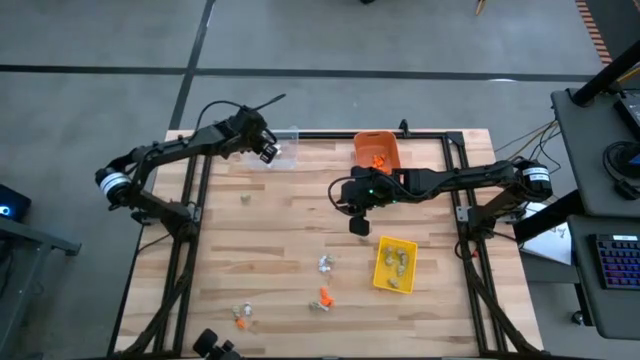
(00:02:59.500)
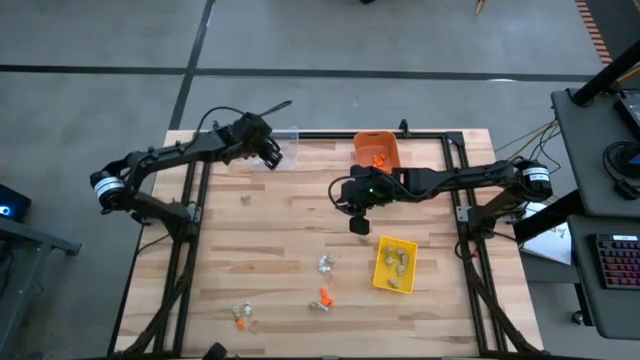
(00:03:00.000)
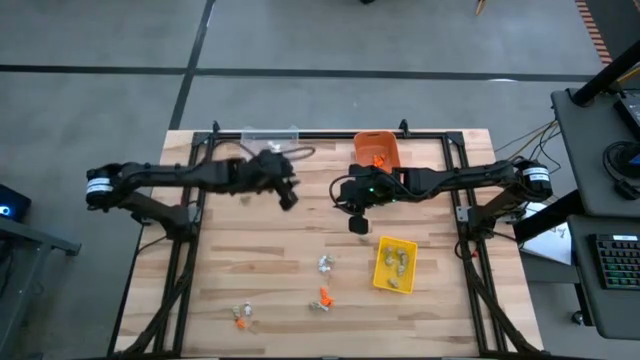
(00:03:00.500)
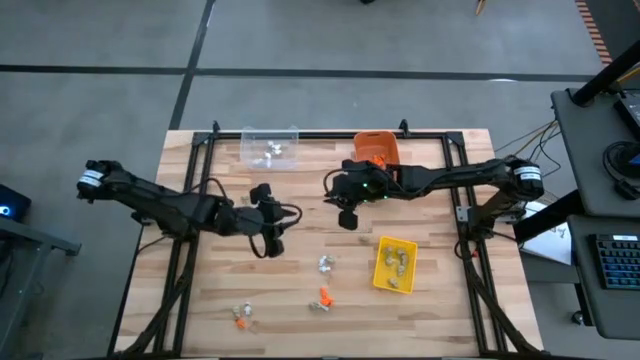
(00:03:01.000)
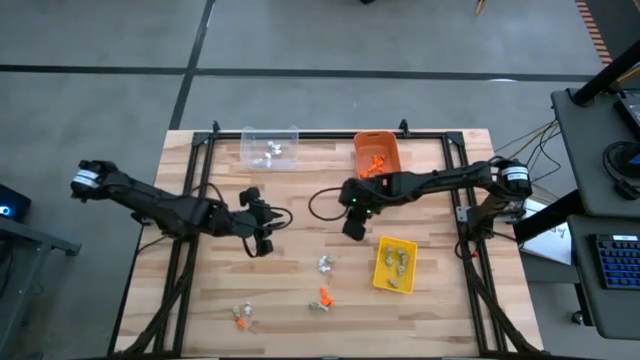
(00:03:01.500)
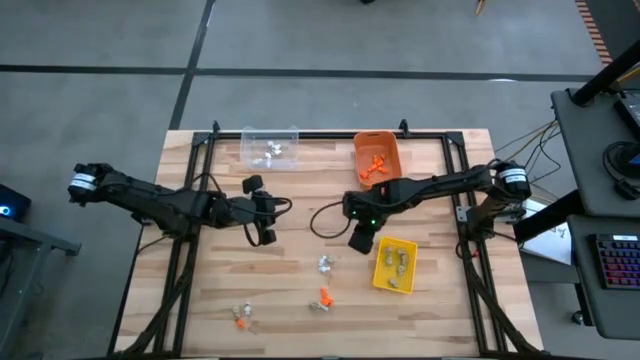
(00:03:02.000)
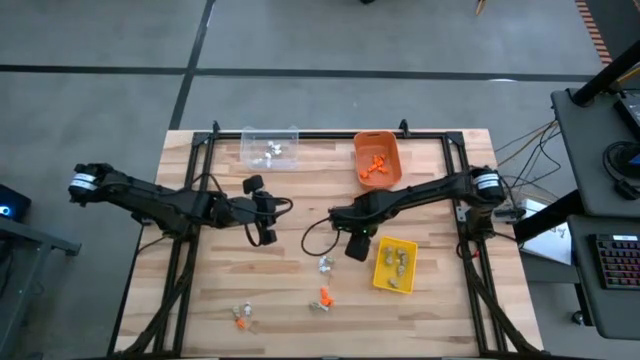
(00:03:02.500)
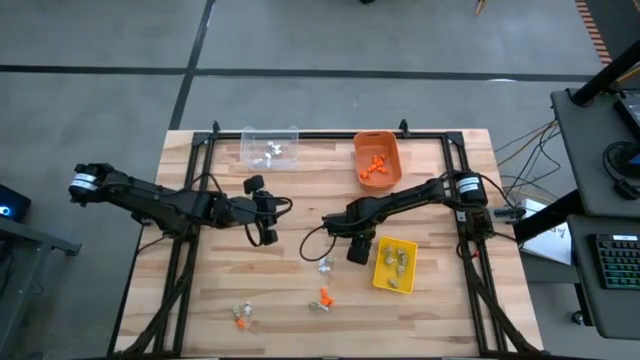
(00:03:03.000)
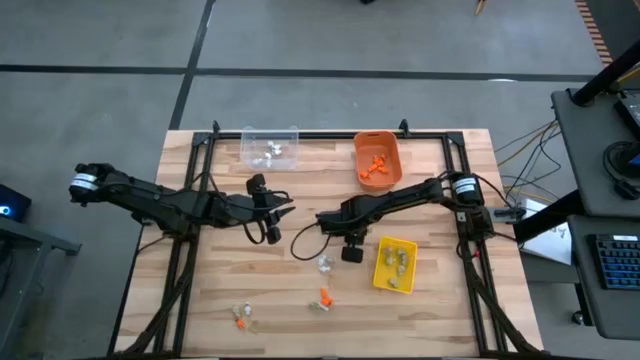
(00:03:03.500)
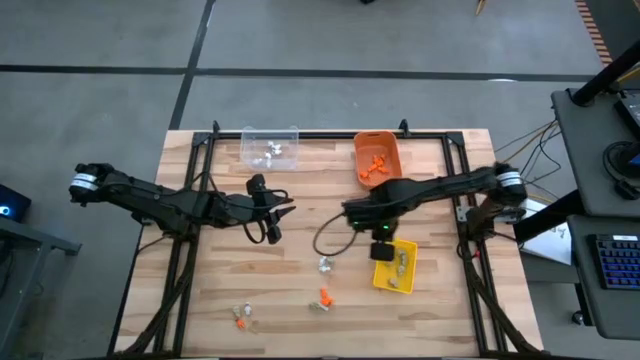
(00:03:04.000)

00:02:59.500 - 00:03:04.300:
Task: Sort Halloween decoration
Put the gray skull toy into the yellow bin

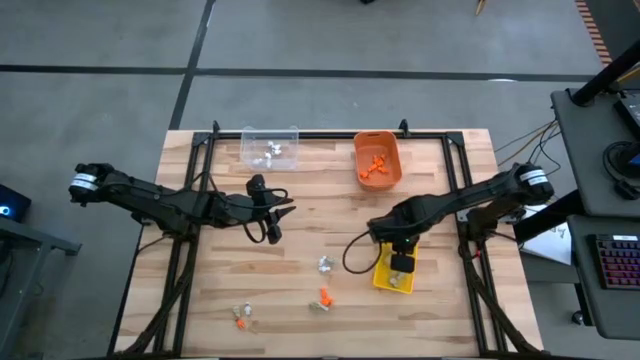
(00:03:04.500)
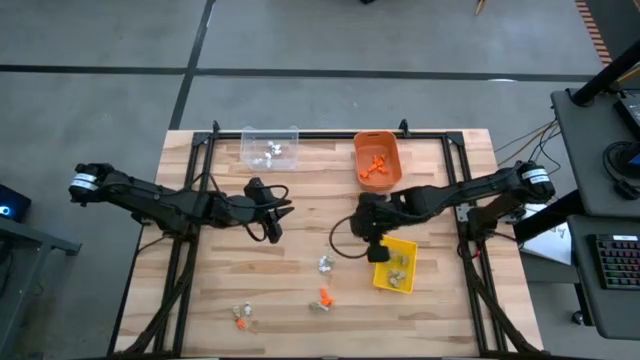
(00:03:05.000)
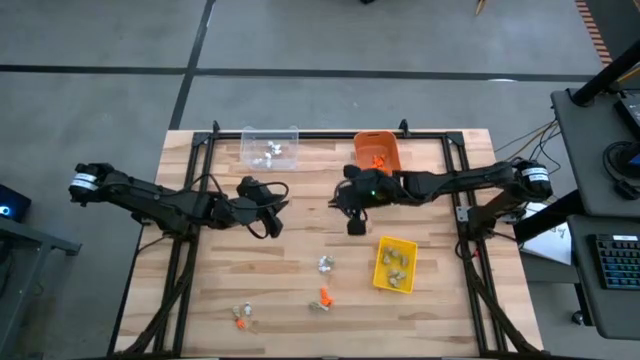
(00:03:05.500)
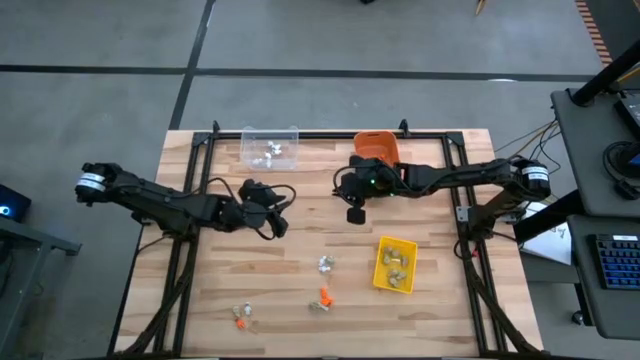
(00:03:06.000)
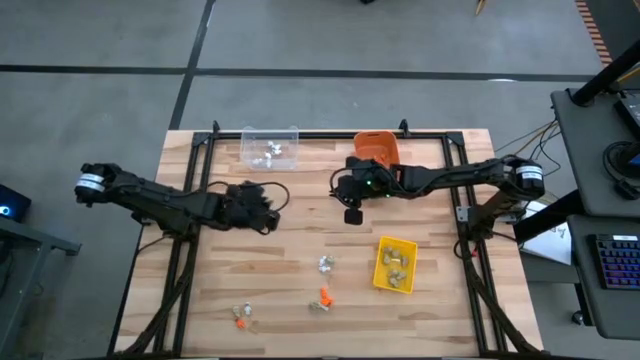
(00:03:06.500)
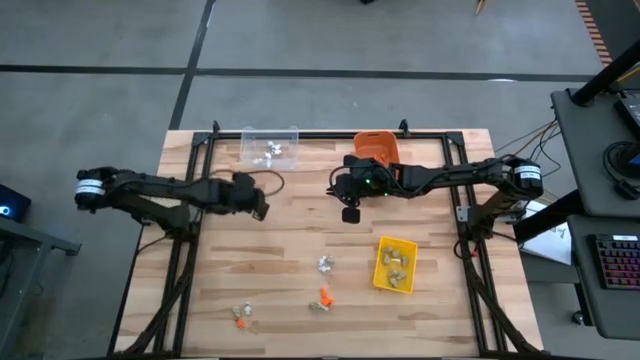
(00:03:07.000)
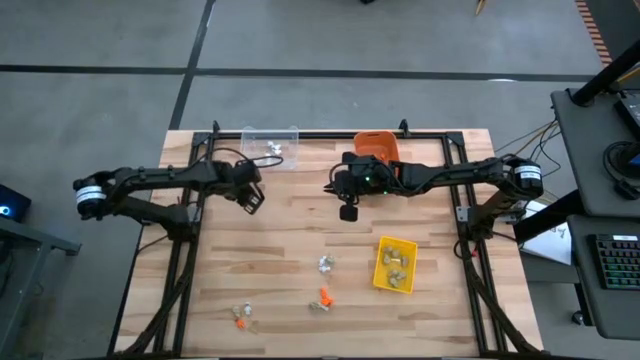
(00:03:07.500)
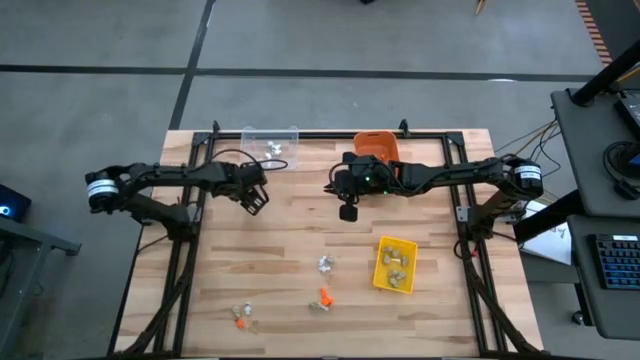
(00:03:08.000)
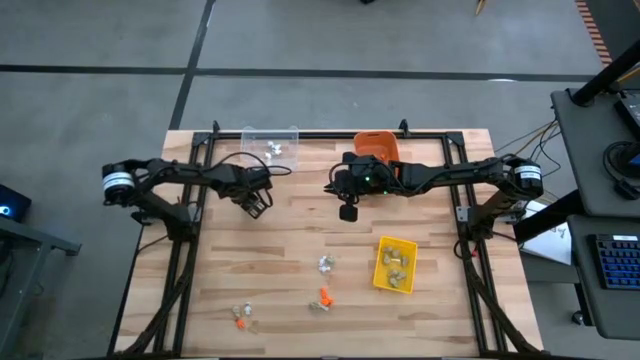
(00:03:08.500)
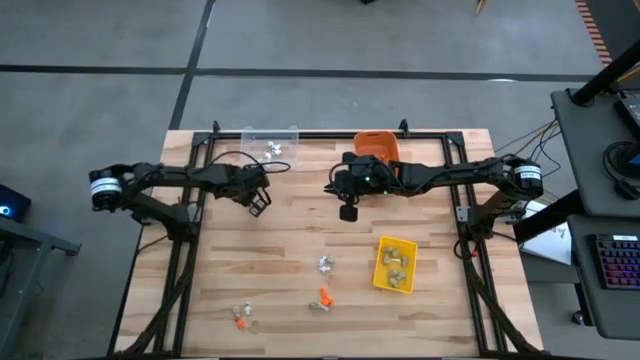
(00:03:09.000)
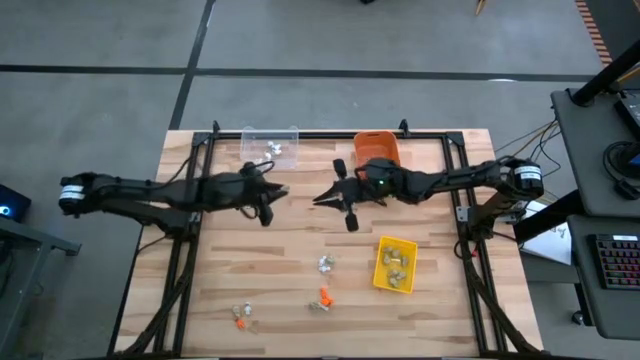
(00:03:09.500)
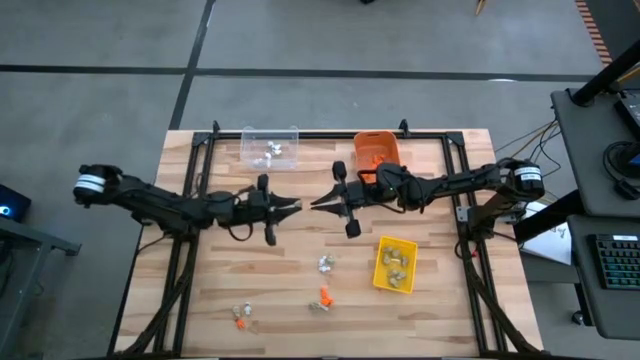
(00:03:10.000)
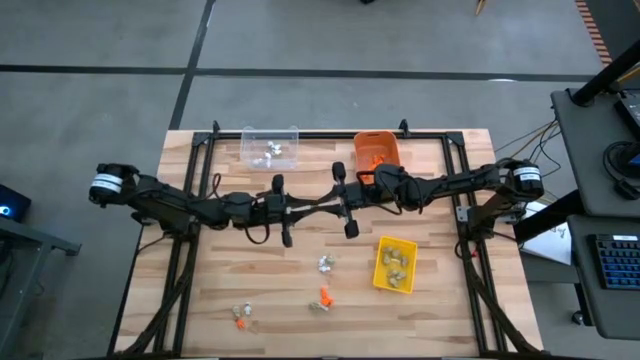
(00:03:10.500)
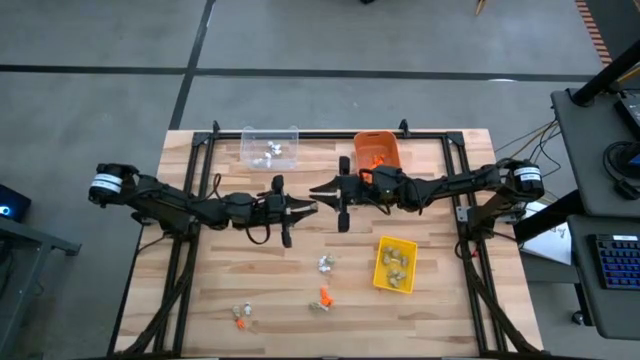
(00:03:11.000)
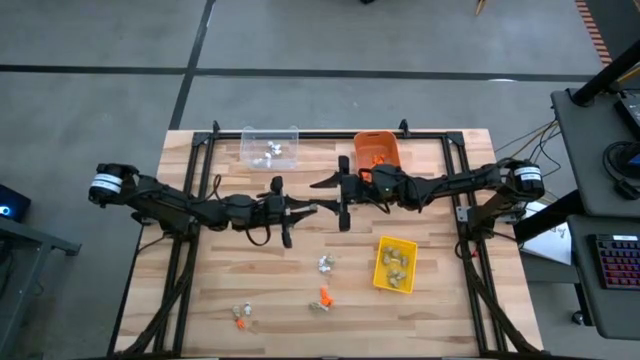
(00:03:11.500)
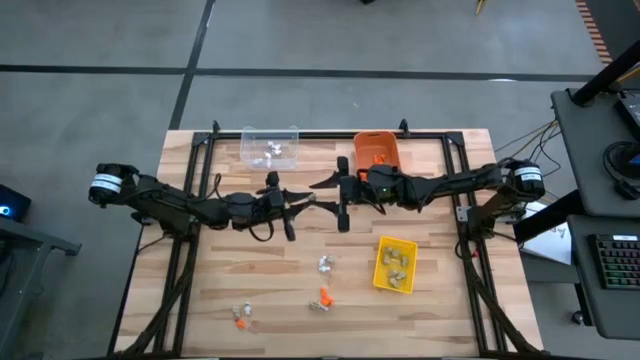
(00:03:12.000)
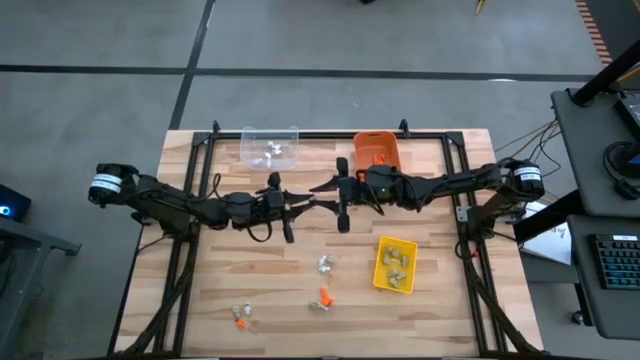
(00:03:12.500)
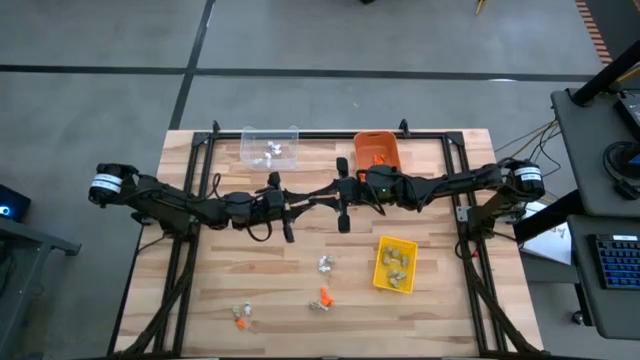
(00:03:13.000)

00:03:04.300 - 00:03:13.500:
Put the gray skull toy into the yellow bin

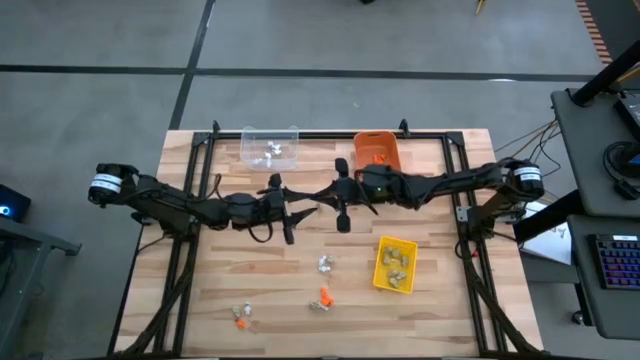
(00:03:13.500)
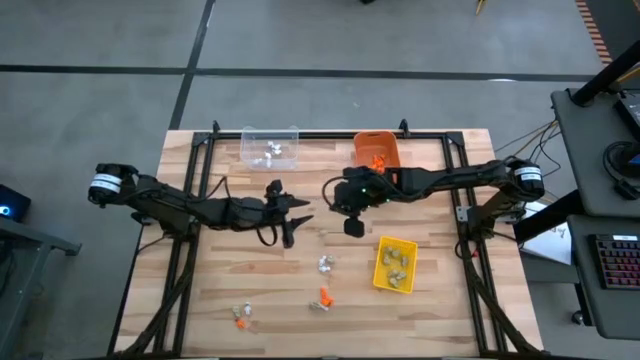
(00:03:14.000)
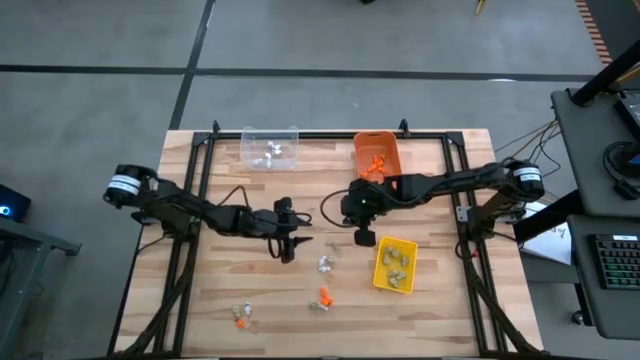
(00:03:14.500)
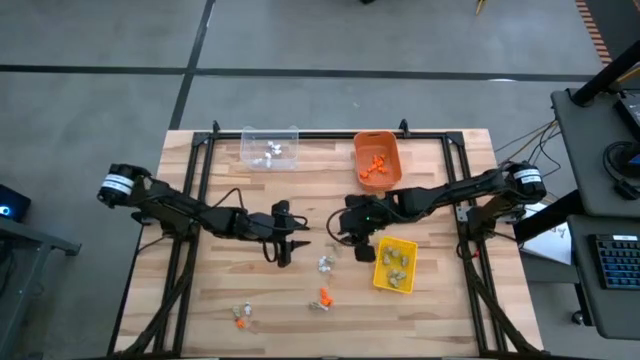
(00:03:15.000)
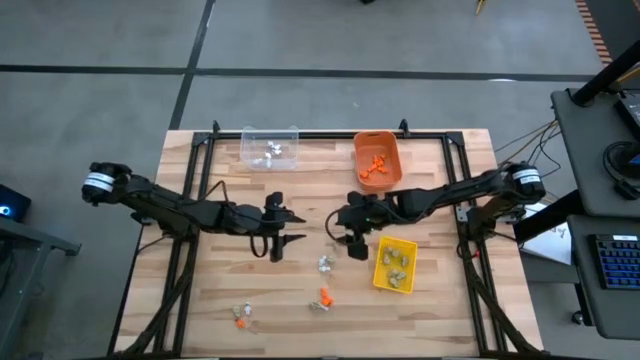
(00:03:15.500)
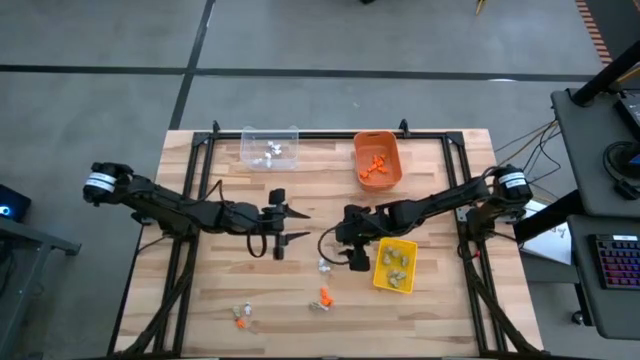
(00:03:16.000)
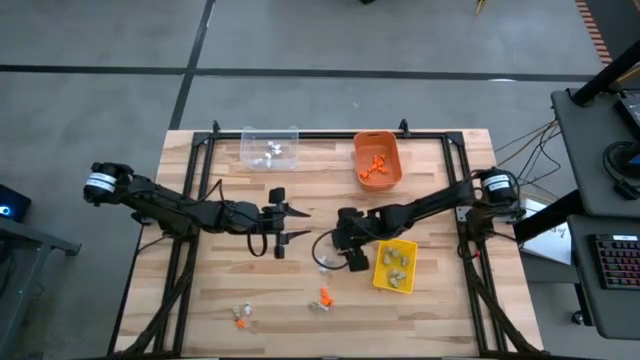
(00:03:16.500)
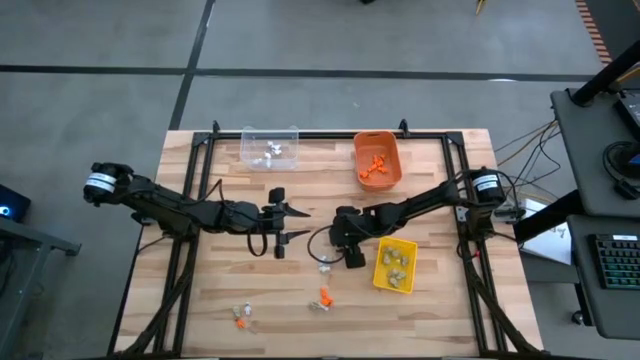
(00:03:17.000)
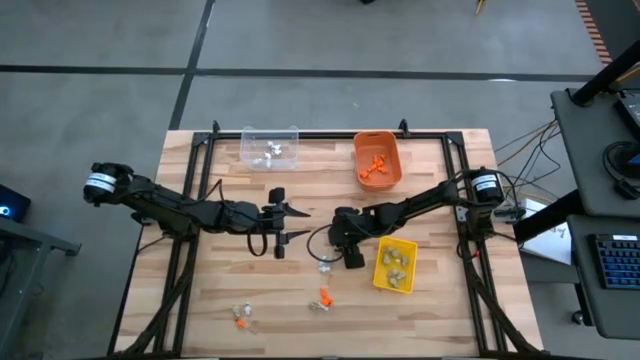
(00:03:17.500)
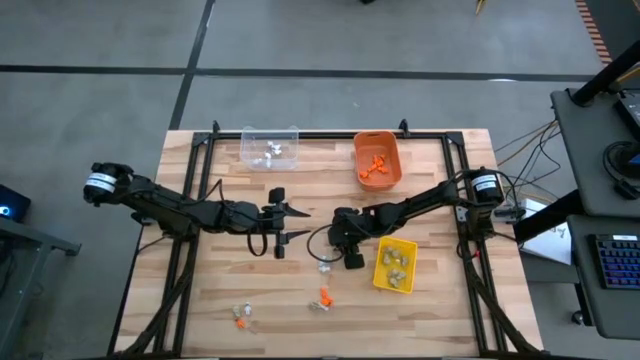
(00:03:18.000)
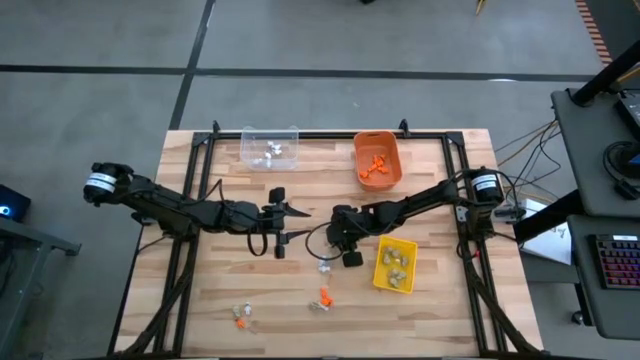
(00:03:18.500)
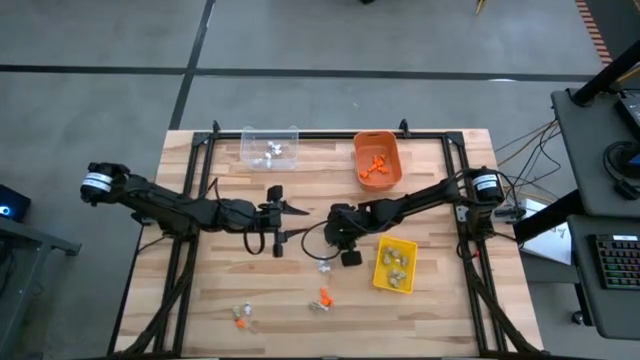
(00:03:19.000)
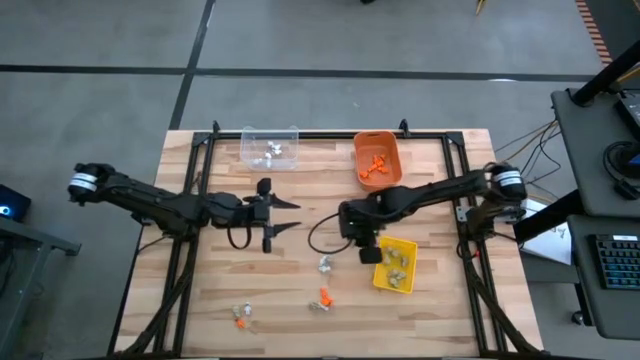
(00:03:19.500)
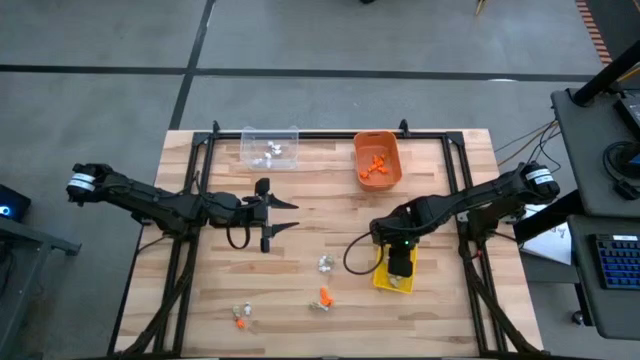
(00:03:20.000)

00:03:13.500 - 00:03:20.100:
Put the gray skull toy into the yellow bin
